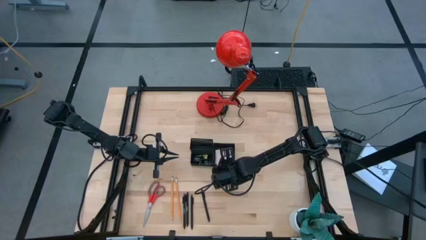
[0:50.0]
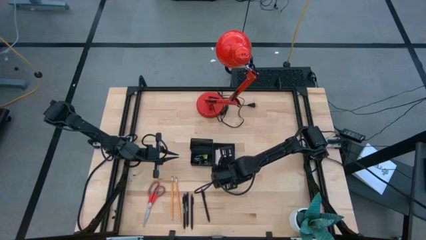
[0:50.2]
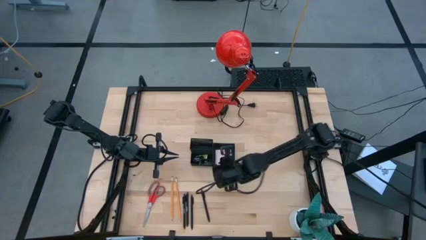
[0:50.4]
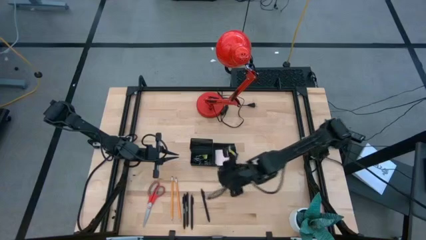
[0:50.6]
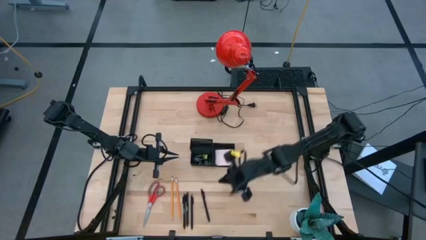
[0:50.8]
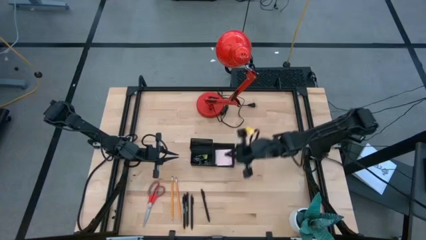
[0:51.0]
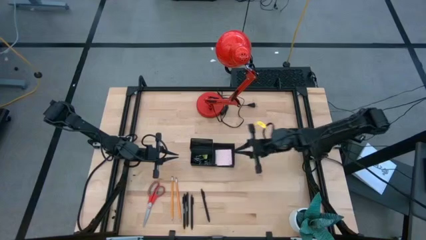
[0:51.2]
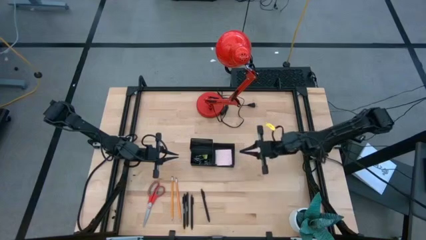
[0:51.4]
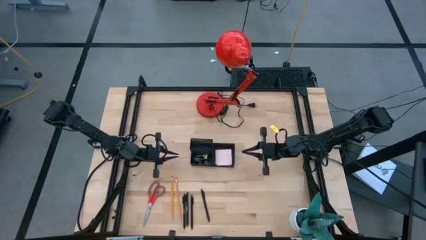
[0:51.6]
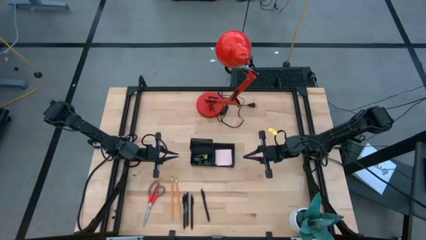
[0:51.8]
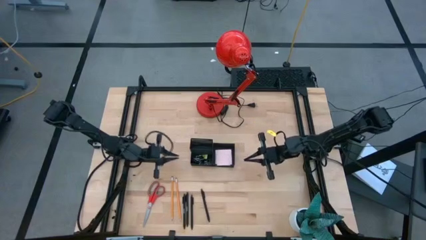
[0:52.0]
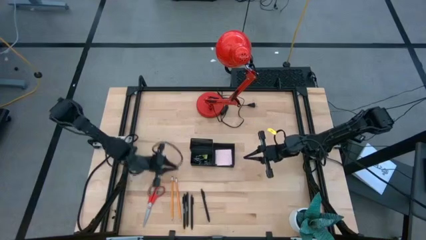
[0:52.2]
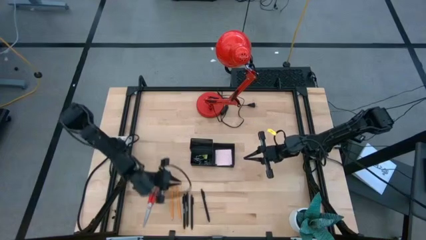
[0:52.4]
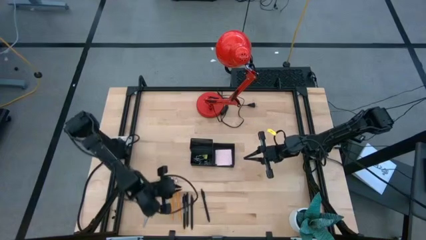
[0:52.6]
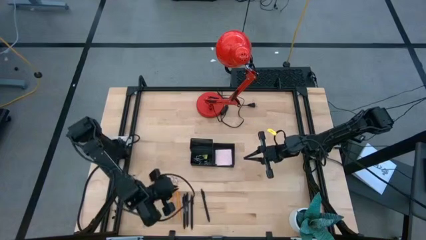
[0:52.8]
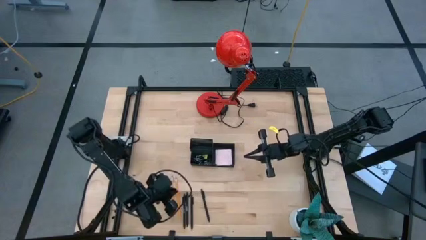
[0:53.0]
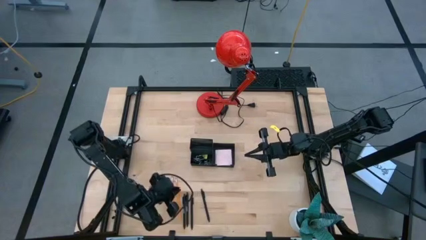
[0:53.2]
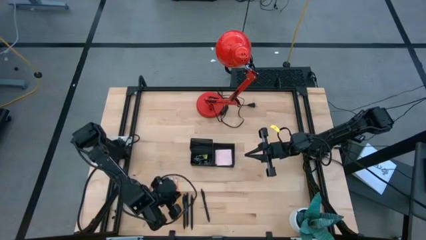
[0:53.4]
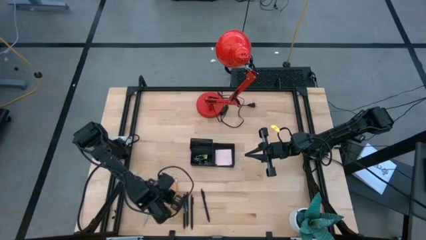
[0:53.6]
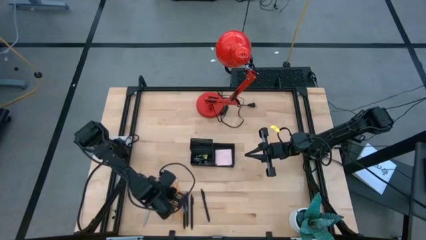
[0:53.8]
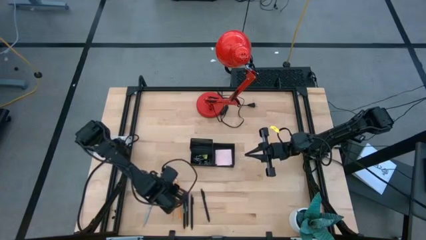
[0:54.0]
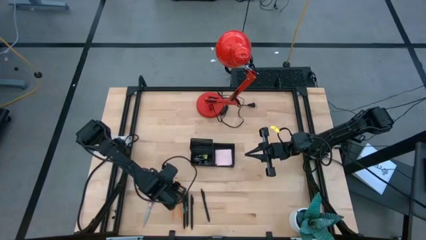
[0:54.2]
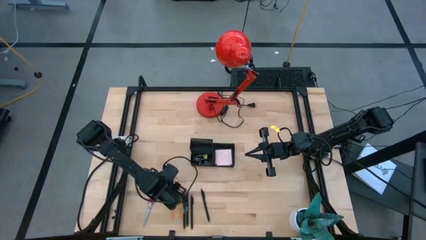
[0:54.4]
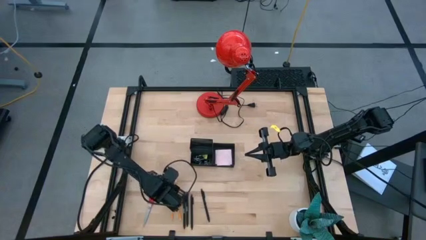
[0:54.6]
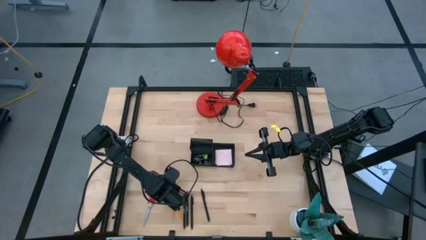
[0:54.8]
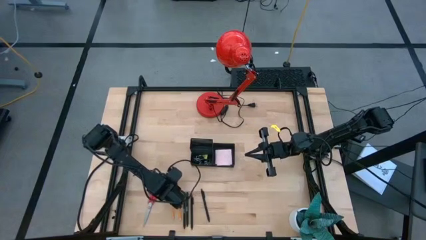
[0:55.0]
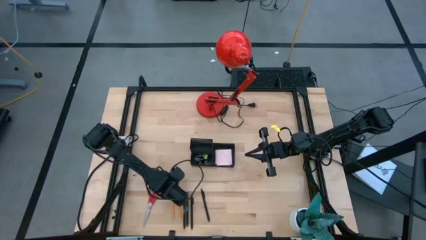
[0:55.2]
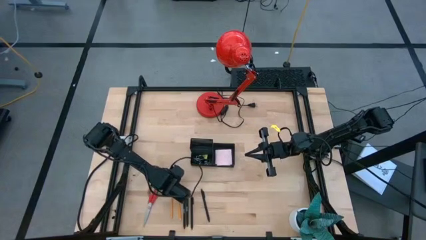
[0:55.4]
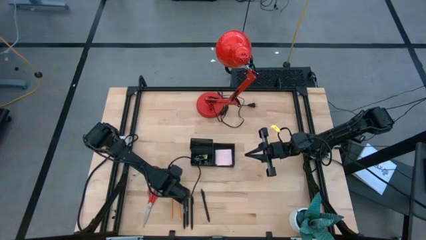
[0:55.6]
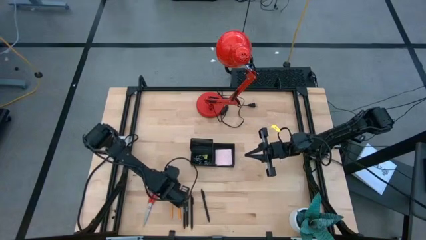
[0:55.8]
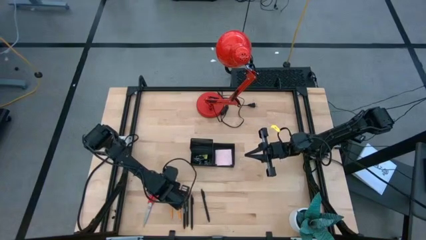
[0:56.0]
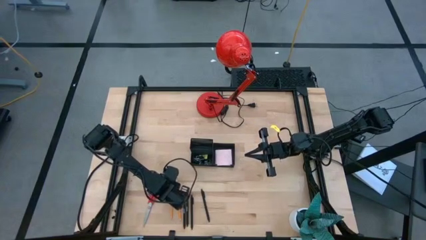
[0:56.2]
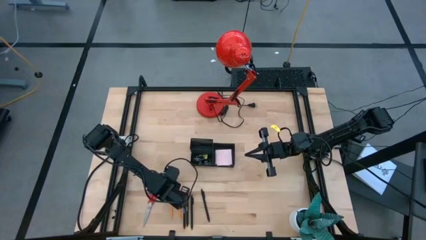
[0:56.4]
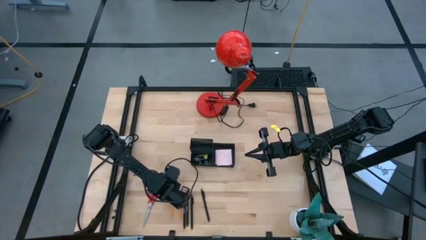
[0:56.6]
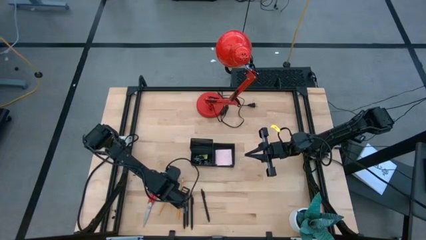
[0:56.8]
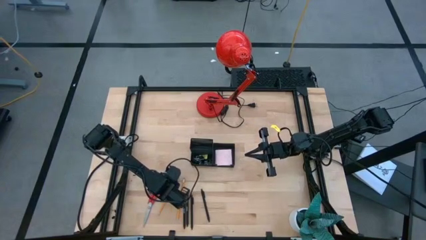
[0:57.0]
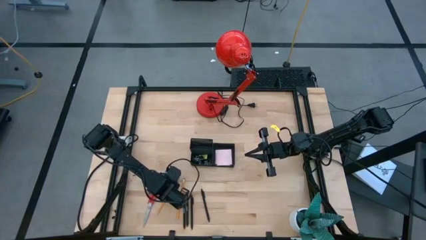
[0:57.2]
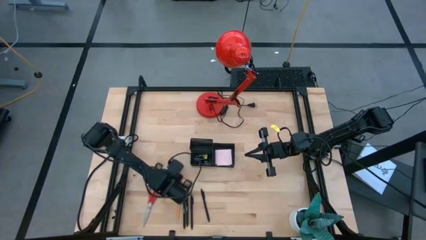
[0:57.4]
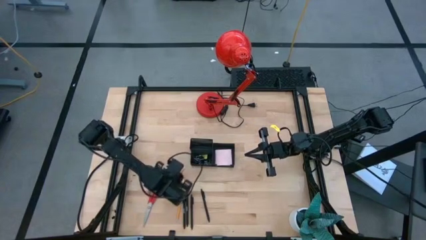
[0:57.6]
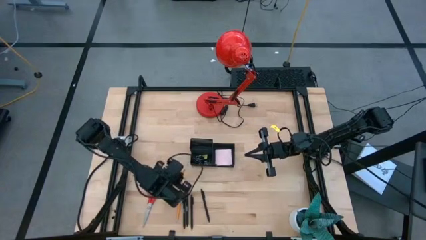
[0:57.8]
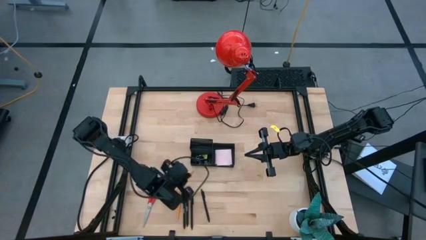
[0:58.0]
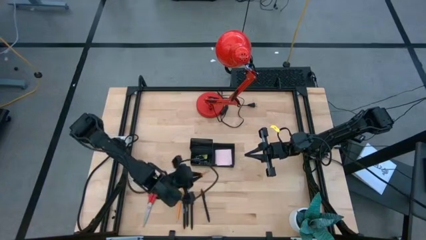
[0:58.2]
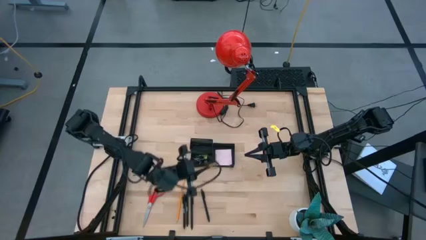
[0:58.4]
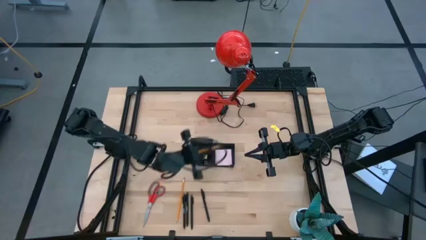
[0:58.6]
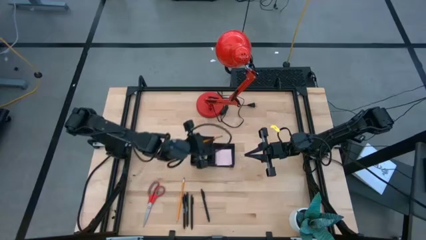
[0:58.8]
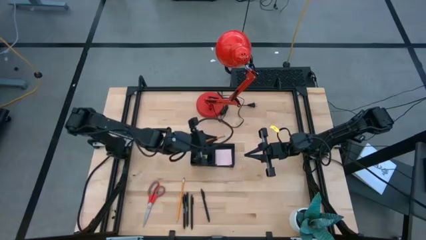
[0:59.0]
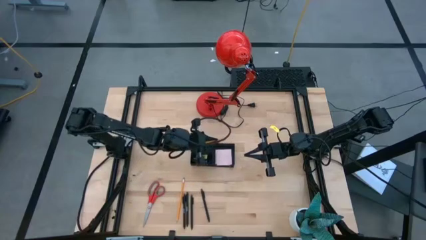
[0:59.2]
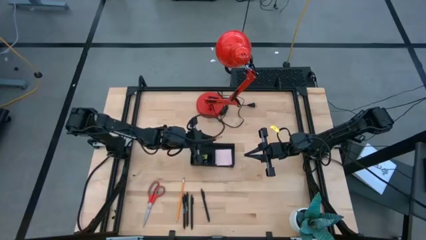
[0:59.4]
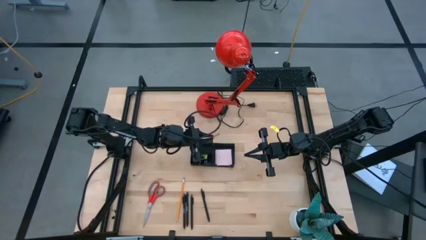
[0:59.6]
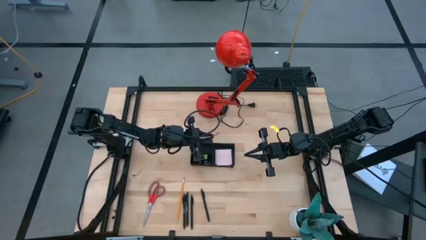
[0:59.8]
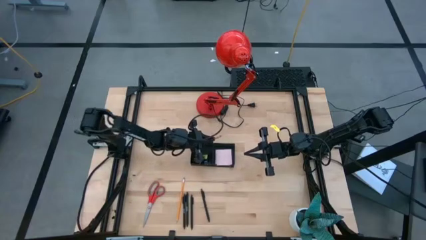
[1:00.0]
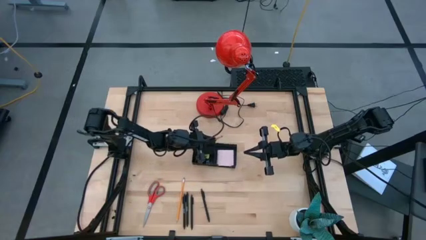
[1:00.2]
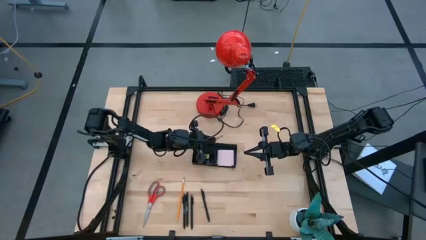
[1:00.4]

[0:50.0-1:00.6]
Task: Pick and place office supplies into organizer
Put the orange pencil into the black mesh desk organizer

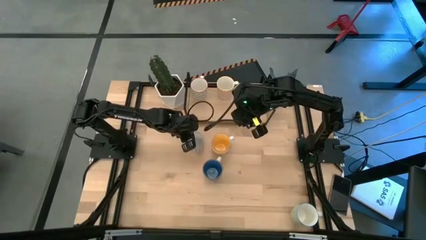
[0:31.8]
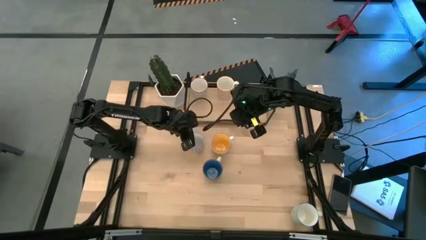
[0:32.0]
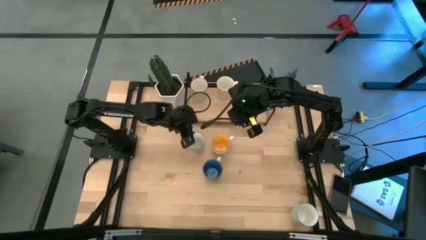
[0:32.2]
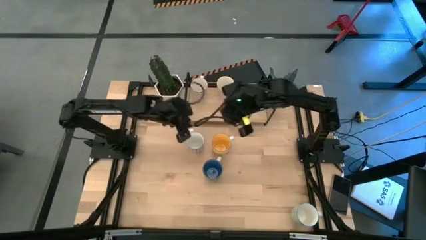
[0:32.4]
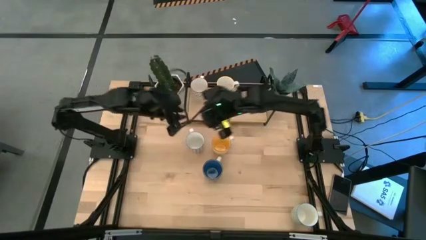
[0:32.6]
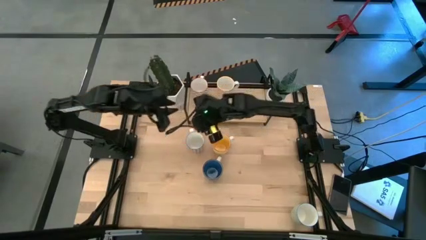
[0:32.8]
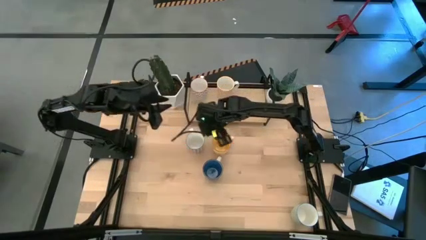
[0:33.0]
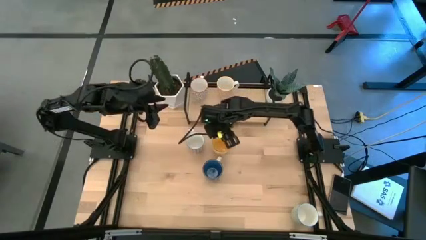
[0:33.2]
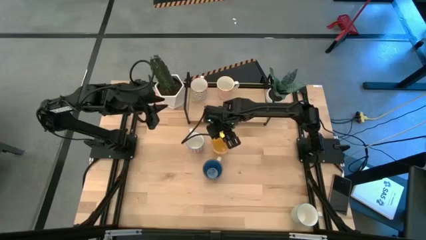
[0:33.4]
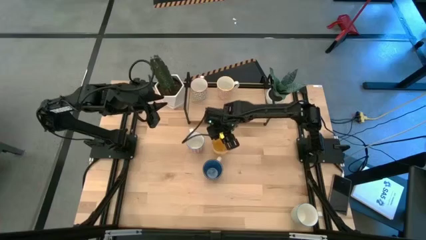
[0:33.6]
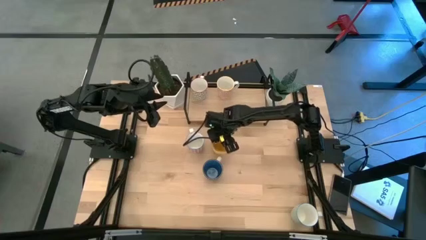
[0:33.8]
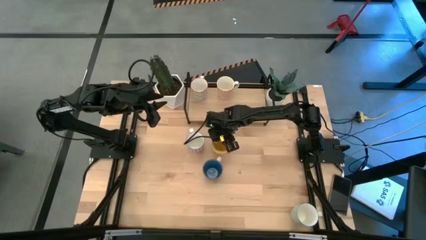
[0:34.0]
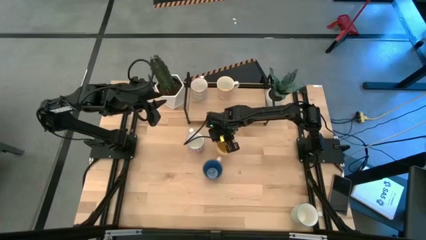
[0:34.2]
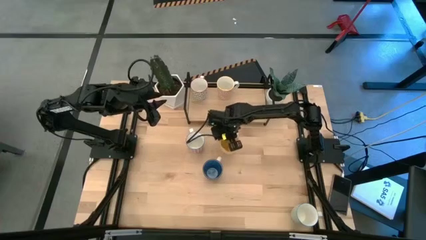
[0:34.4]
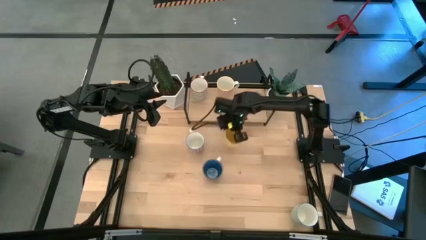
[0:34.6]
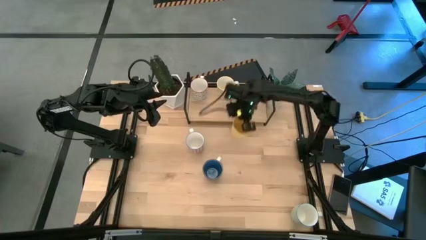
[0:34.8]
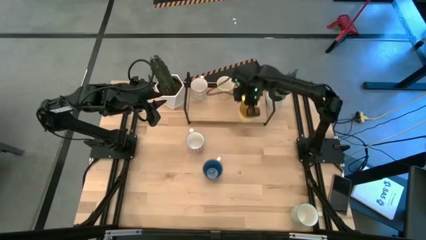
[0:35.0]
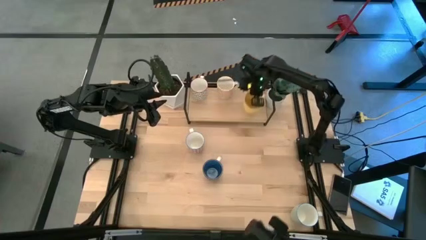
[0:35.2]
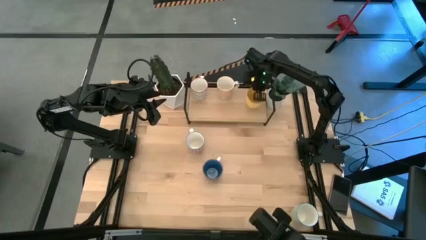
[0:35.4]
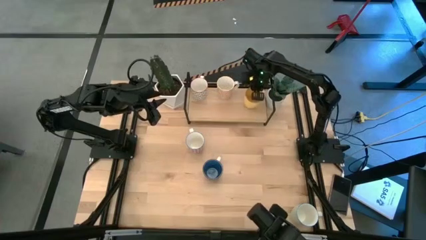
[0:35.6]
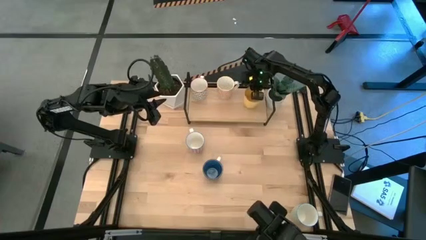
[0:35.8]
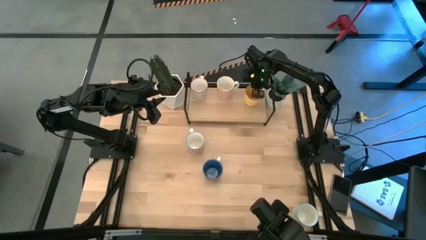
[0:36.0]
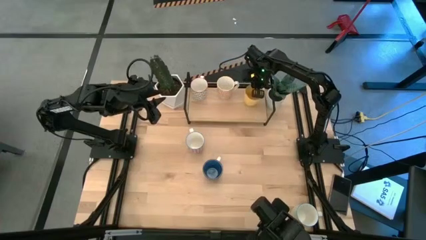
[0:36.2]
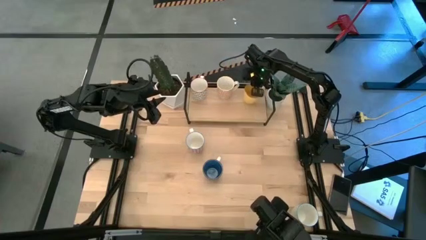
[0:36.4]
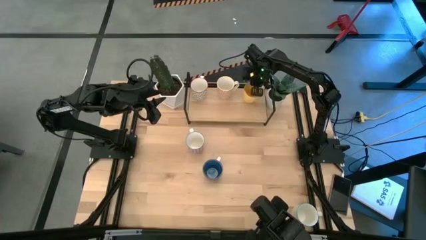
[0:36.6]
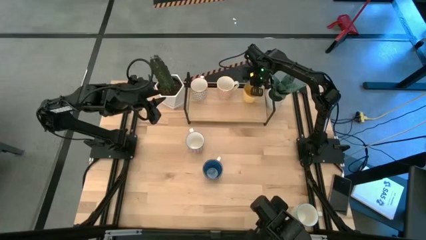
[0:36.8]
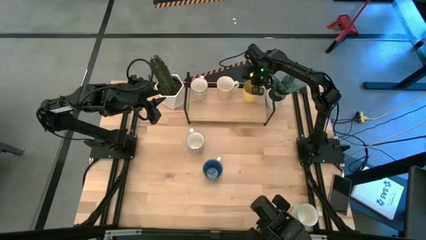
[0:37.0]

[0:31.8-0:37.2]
Task: Place coffee mugs
Put the yellow mug on the shelf
